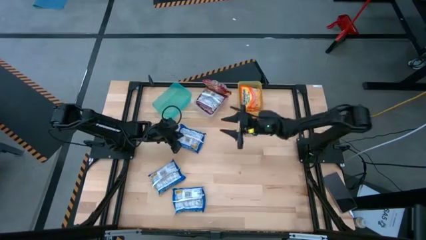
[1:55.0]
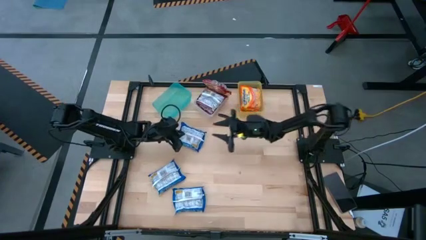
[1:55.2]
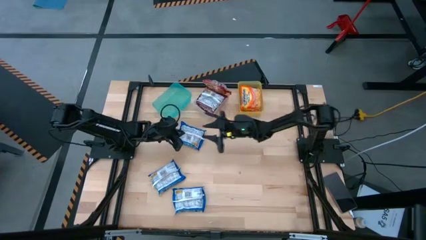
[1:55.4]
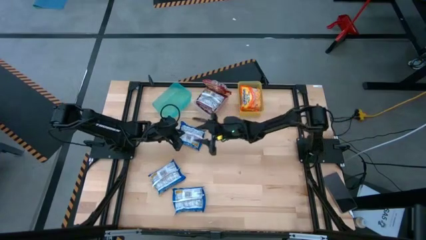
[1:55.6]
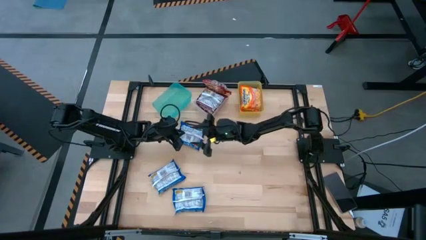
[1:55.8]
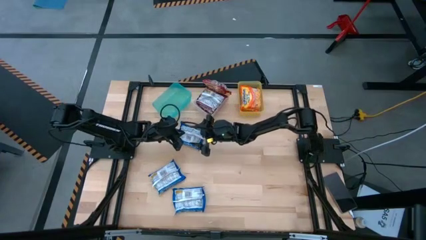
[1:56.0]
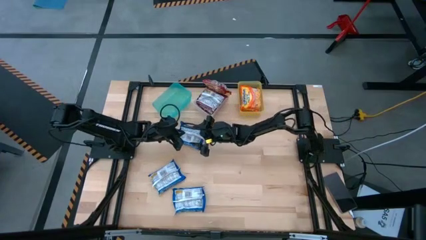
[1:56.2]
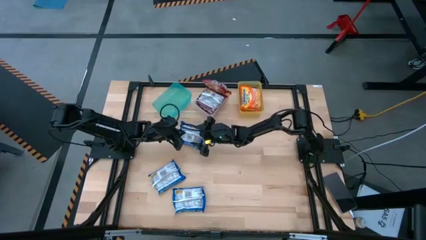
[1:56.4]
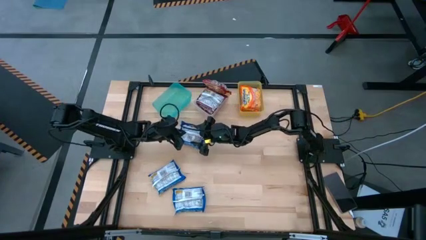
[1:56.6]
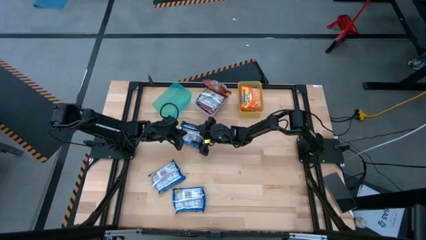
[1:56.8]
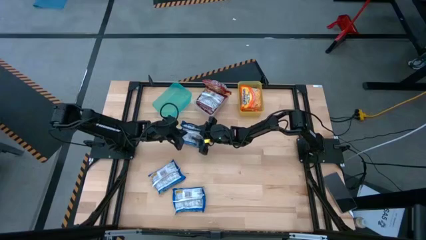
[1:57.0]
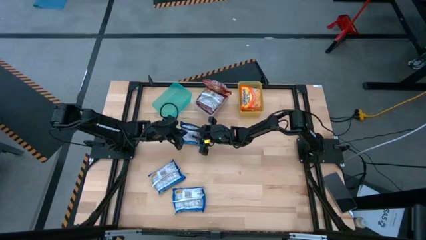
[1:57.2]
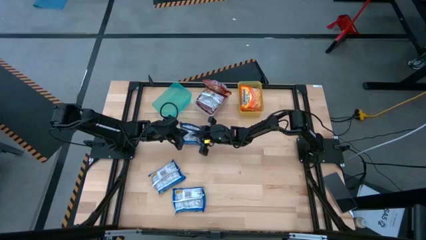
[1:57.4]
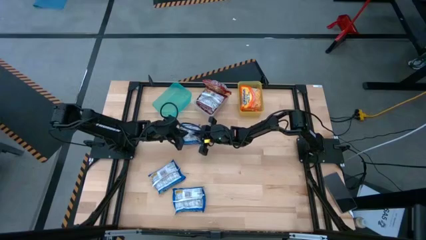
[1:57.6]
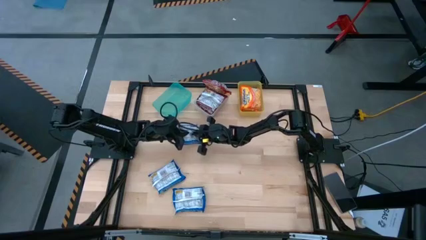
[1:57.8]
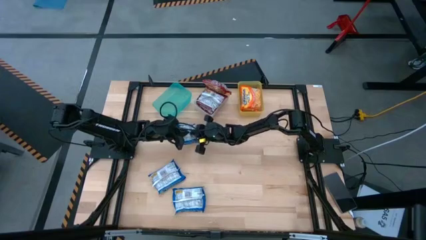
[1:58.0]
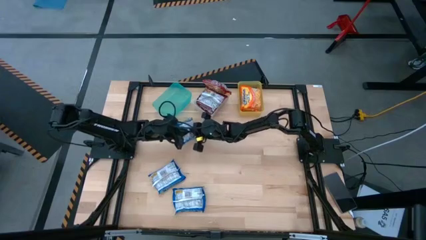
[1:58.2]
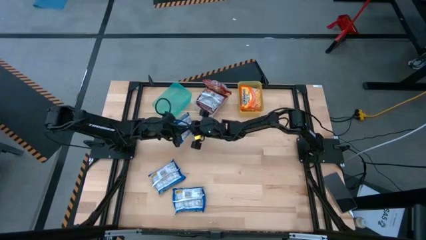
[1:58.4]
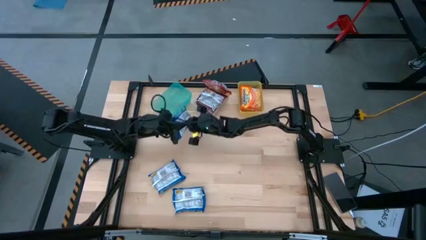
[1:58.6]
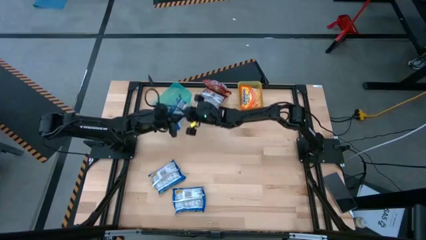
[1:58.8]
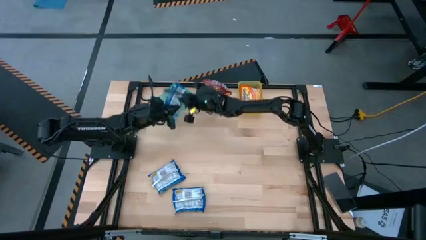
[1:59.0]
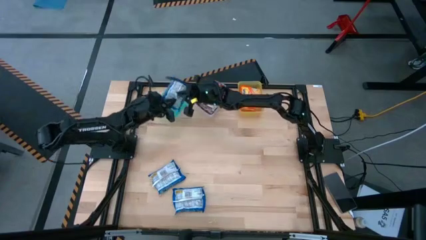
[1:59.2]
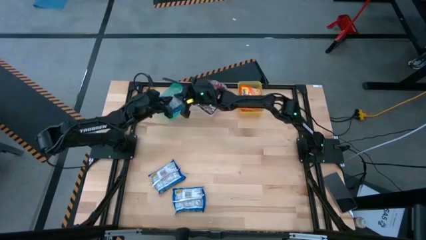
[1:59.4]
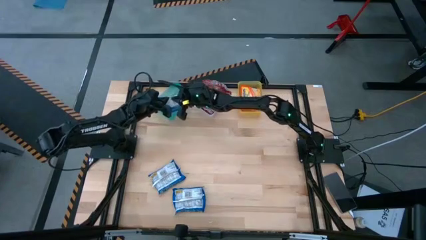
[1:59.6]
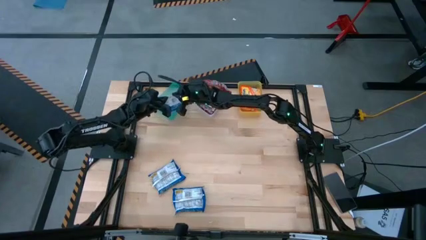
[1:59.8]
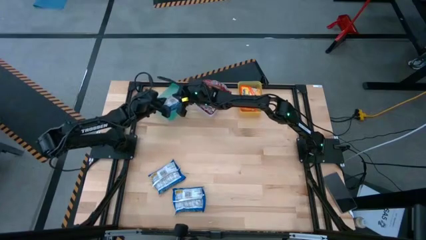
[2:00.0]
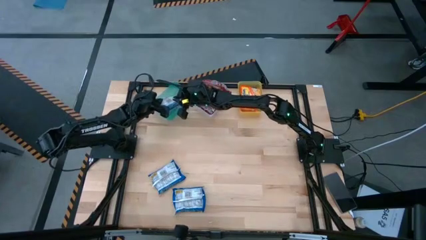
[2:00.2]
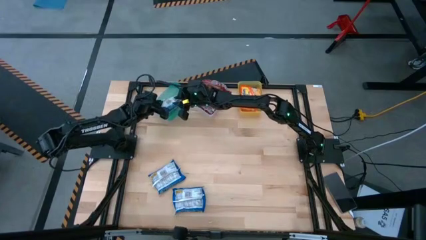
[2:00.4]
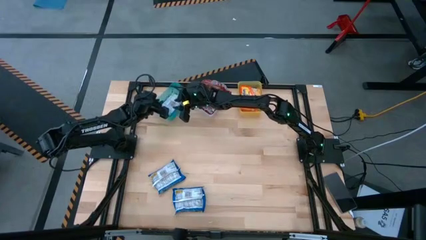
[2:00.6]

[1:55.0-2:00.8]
Task: Sort Maruchan noodles
Put the top blue noodle pack into the blue bin

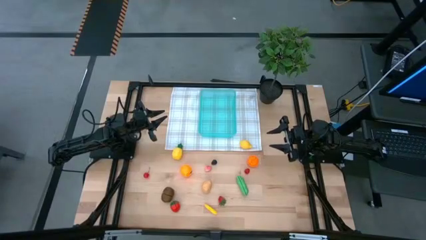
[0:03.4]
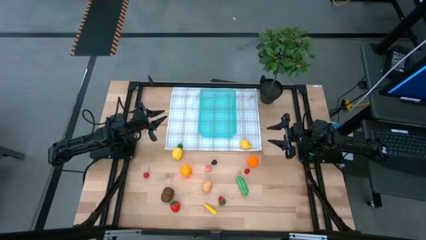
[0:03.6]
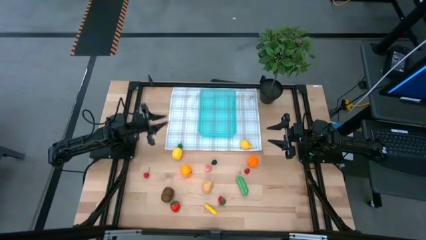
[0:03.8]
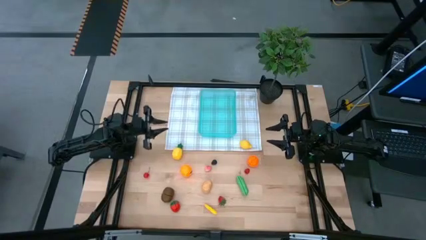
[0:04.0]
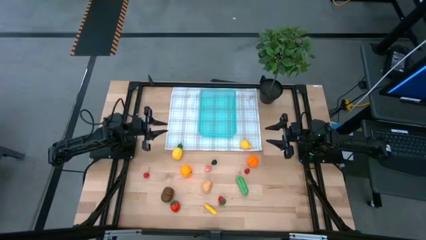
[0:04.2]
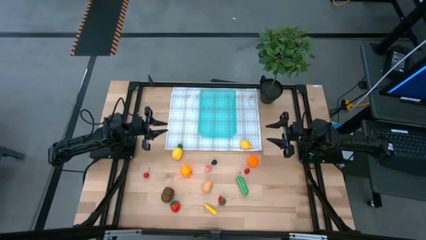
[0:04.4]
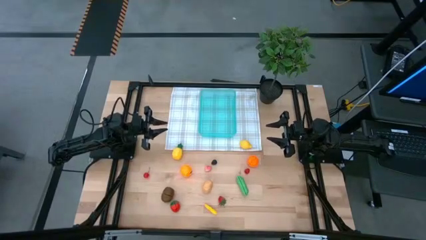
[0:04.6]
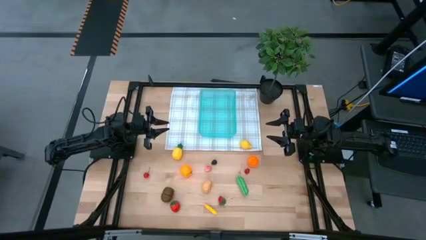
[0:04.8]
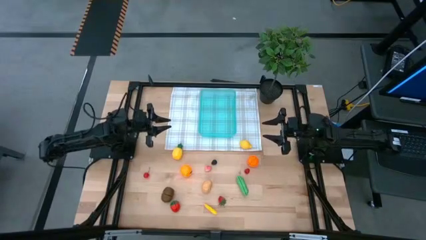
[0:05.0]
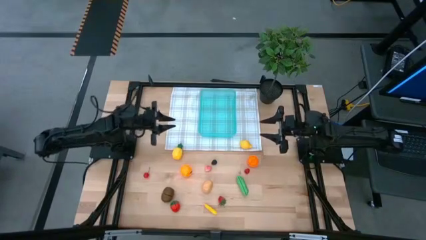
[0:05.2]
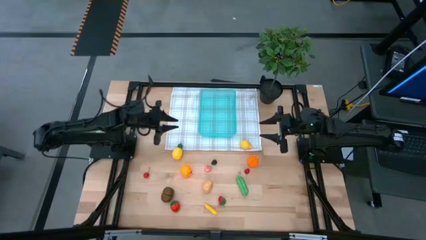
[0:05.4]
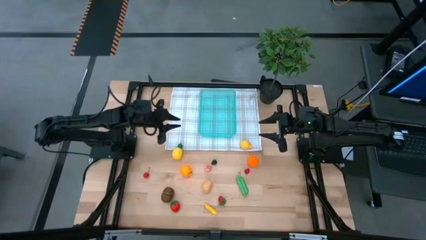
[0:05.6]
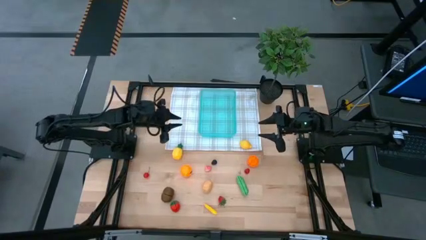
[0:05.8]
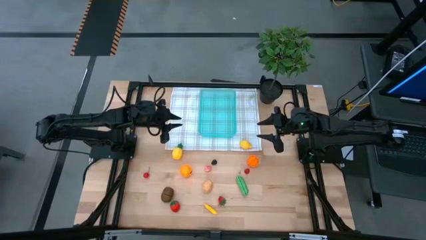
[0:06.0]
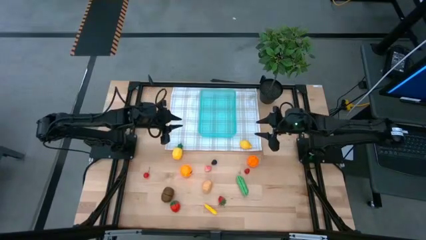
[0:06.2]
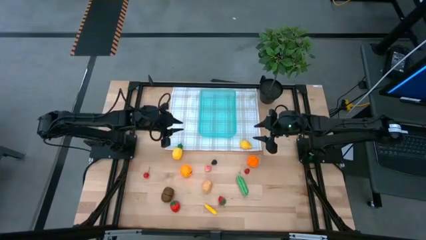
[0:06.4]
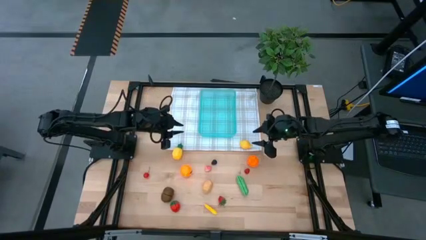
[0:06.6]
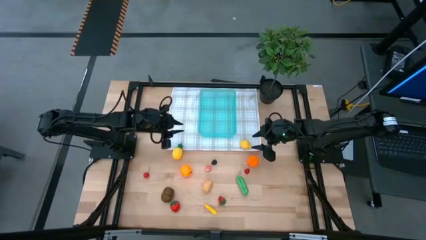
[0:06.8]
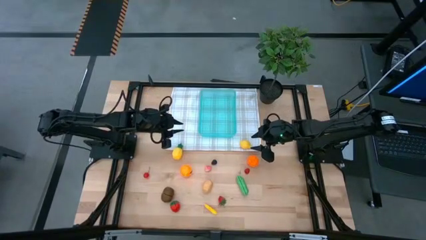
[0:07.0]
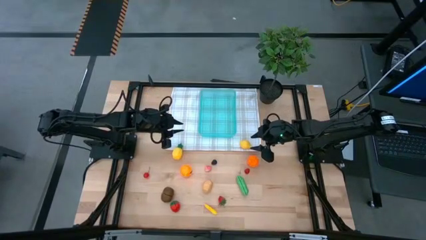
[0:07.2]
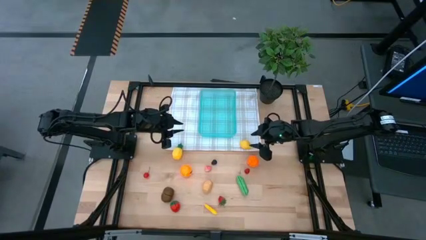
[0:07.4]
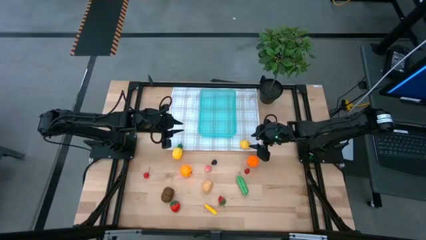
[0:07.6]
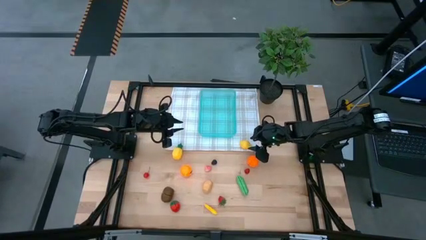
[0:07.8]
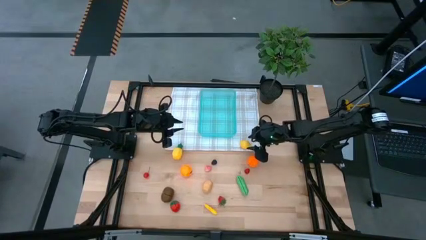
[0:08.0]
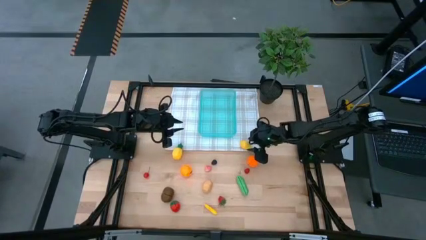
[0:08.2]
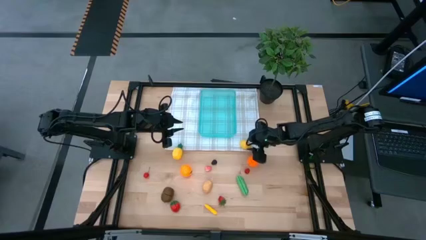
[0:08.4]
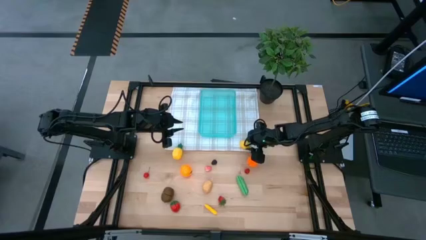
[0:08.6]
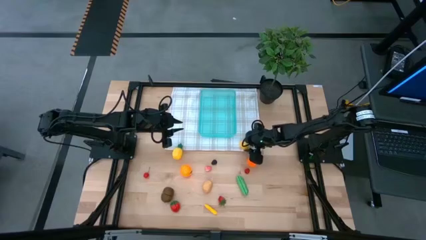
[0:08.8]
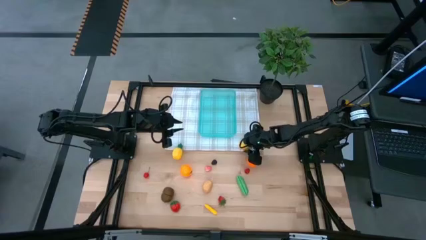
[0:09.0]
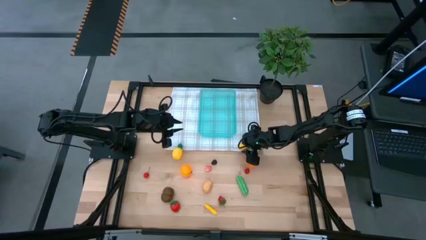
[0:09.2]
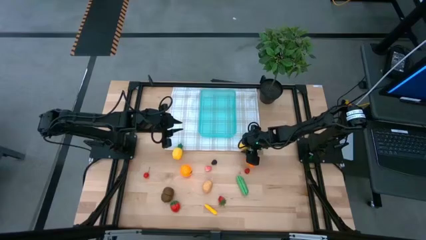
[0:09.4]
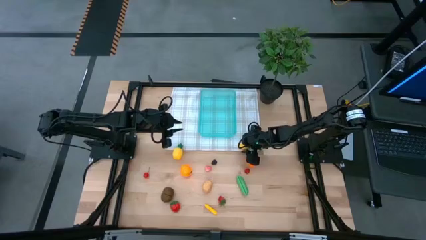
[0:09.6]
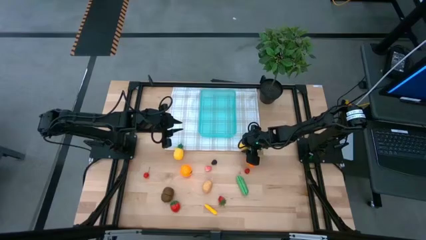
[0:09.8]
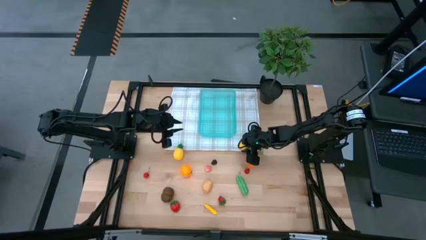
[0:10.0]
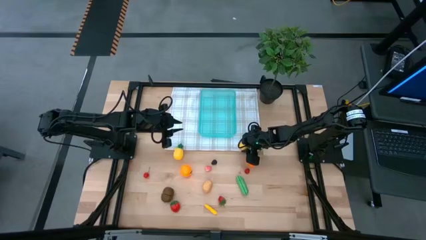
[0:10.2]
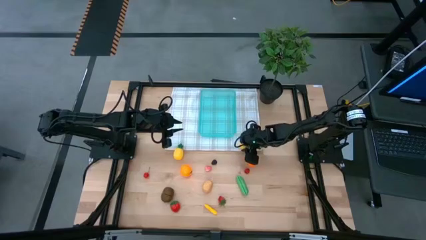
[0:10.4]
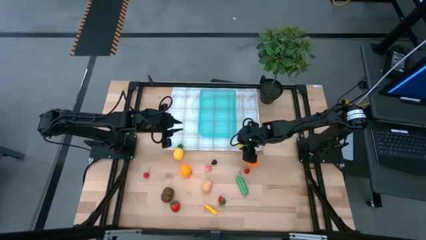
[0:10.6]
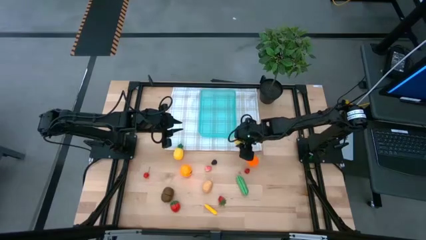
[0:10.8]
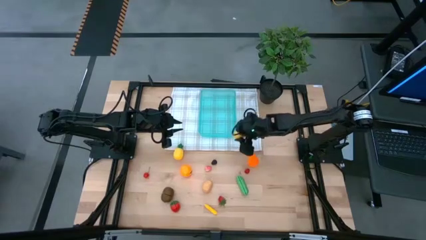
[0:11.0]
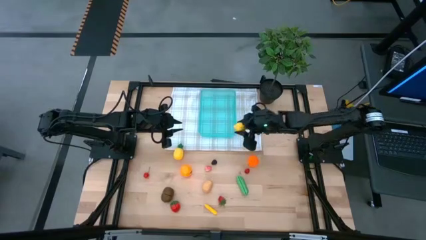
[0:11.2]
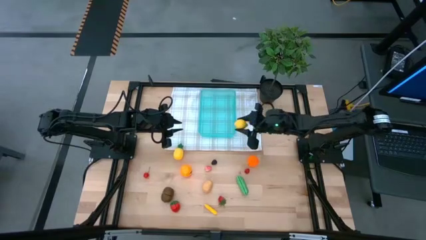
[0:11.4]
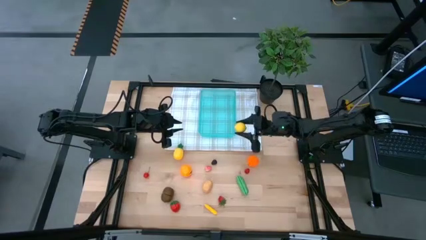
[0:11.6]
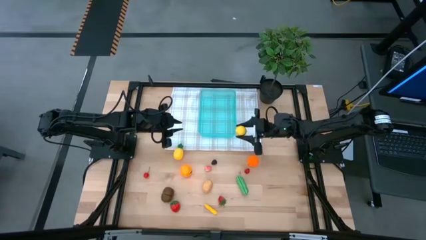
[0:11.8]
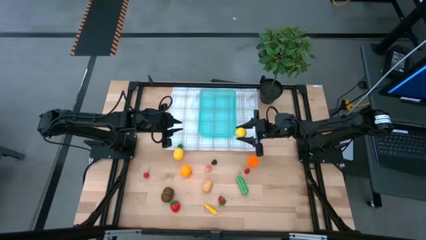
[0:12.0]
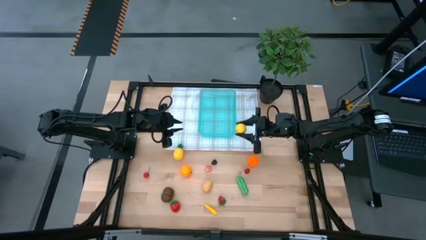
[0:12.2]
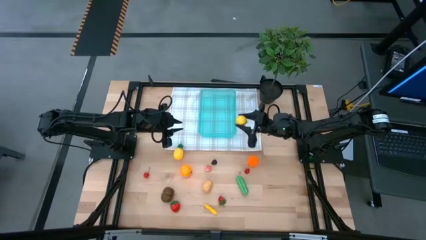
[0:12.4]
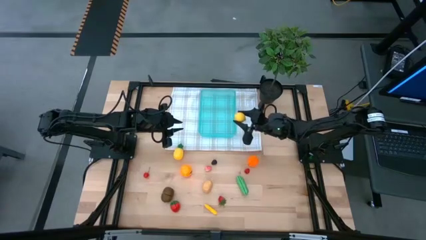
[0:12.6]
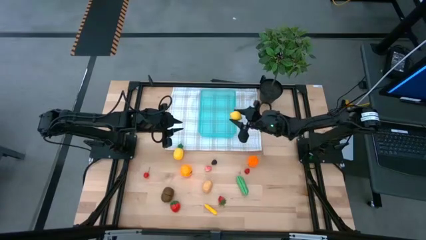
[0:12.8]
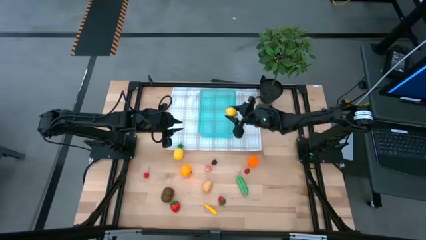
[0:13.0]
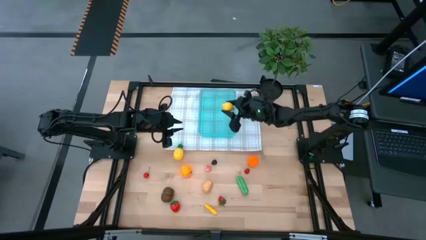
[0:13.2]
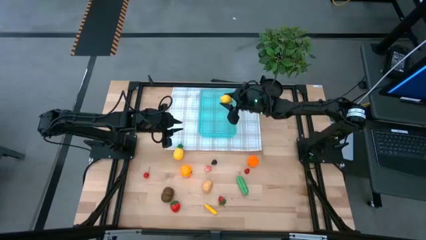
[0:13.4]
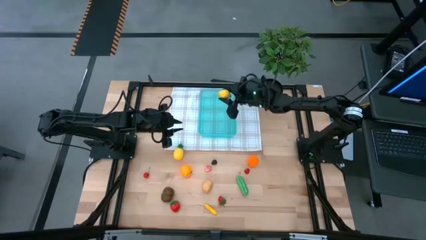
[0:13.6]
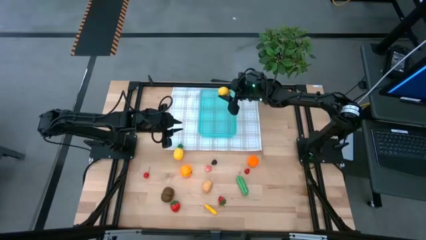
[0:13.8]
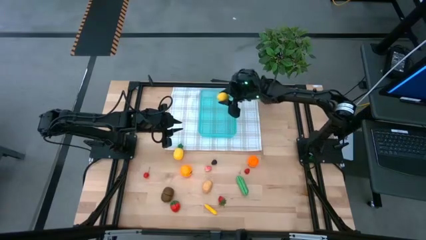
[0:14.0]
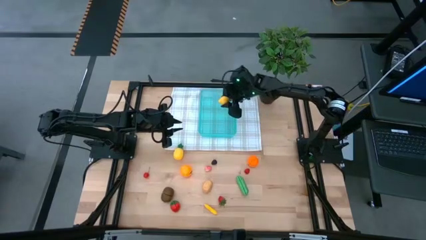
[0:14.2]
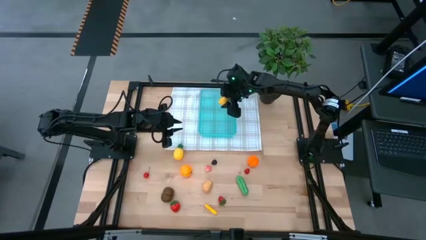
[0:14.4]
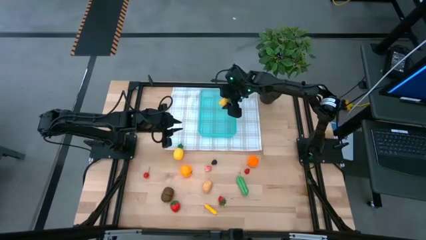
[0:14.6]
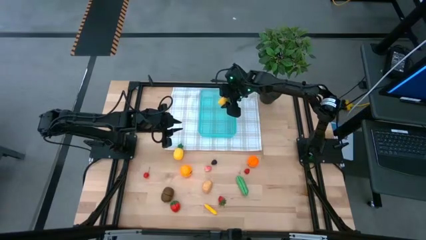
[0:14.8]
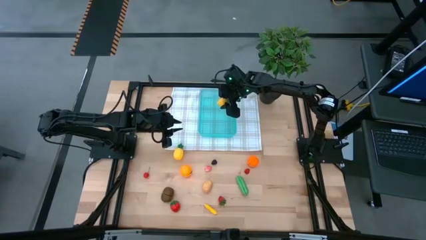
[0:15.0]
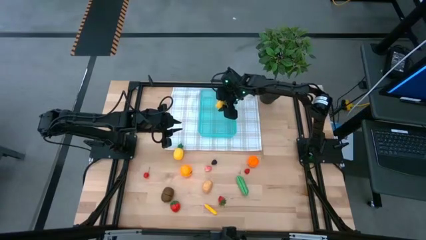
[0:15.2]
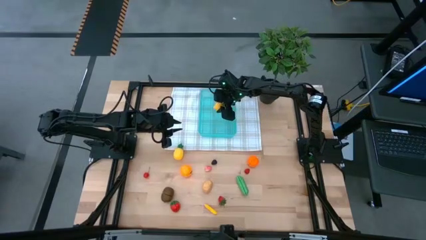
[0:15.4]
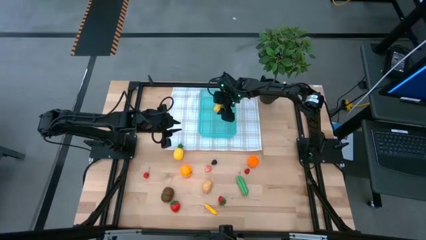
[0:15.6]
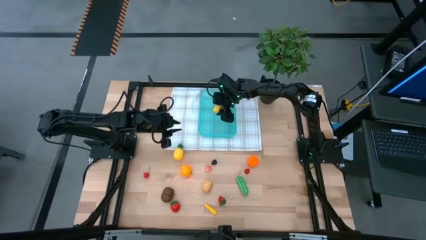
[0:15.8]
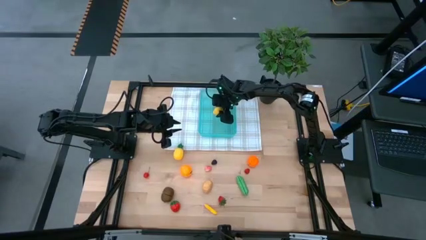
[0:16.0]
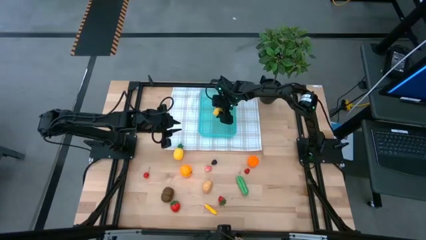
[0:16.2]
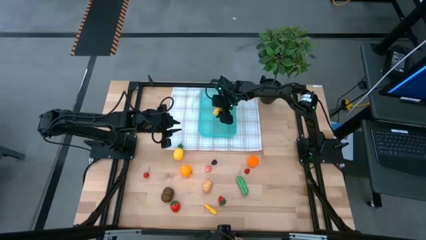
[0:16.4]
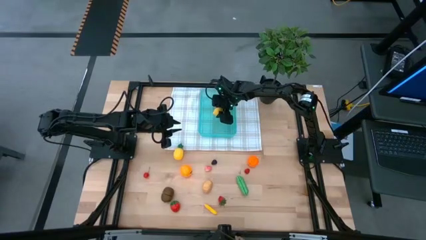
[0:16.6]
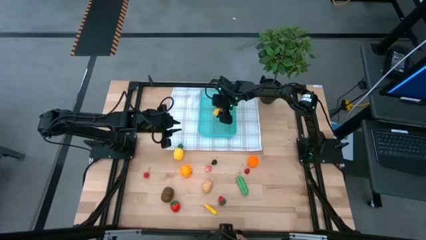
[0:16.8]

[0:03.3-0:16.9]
Task: Pick and placing Produce into tupperware
Put the yellow lemon into the green bin
